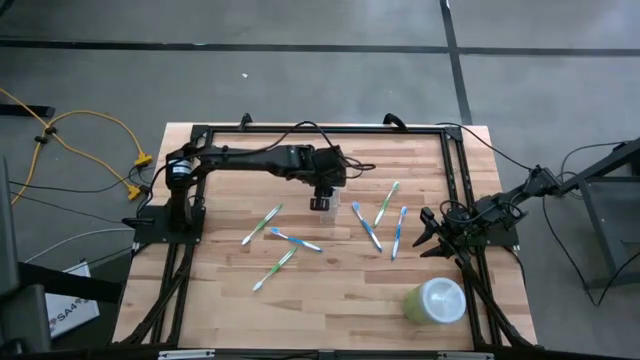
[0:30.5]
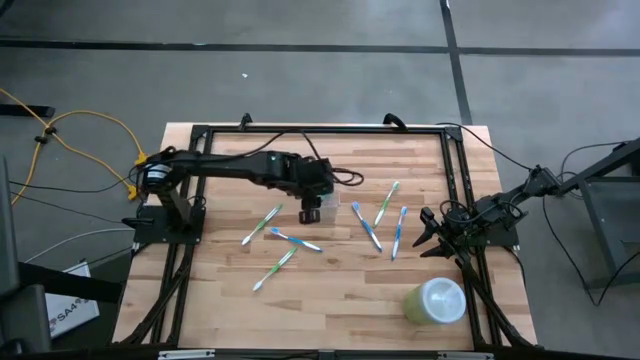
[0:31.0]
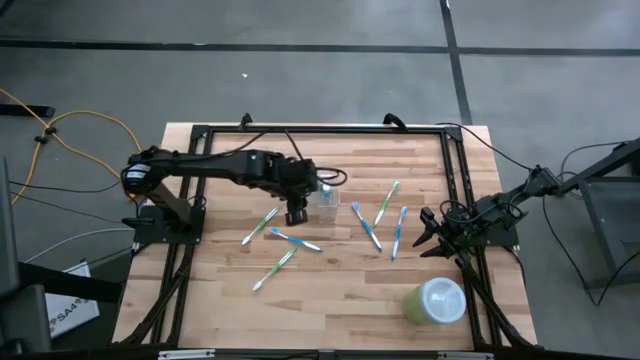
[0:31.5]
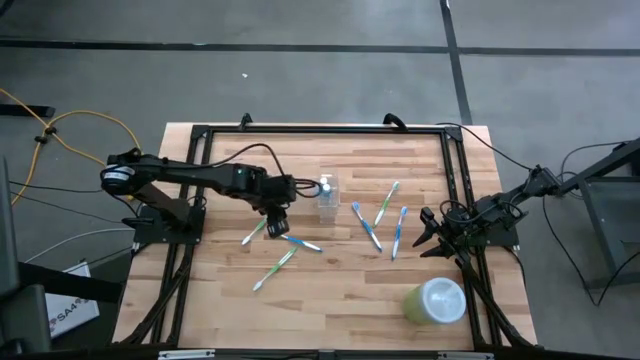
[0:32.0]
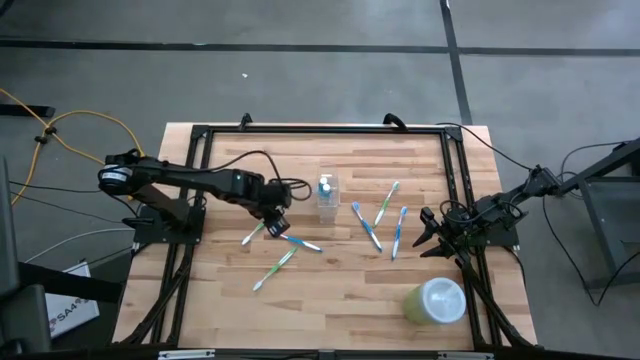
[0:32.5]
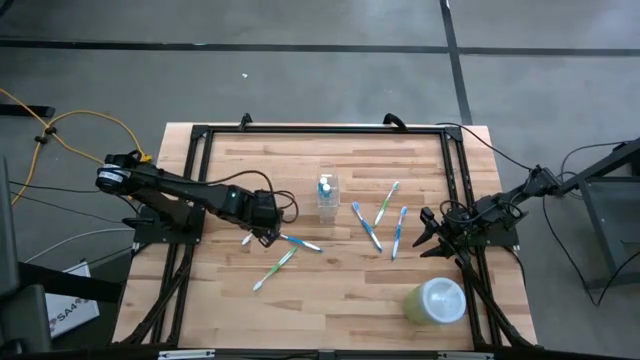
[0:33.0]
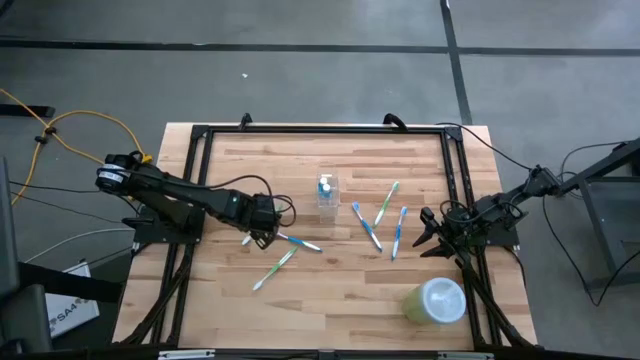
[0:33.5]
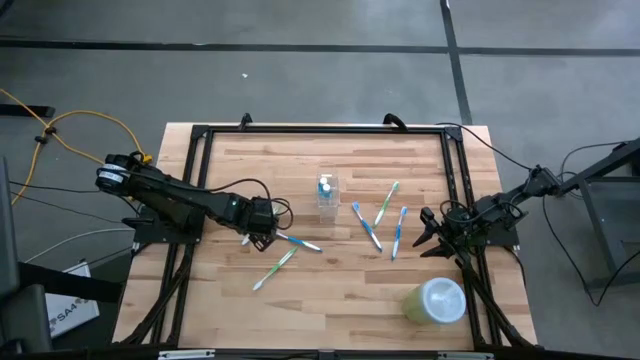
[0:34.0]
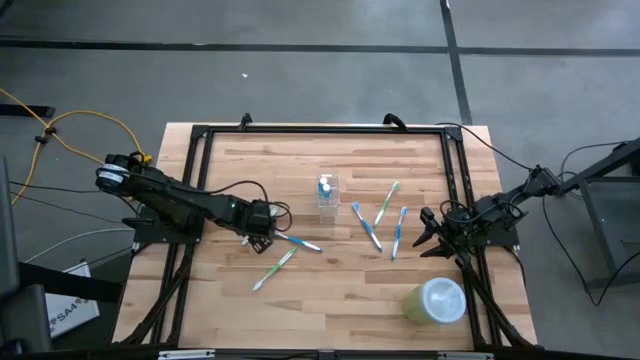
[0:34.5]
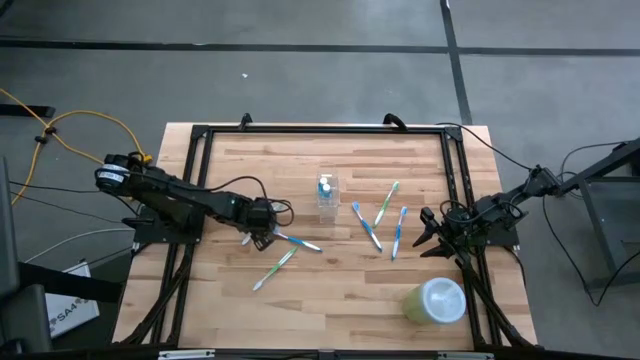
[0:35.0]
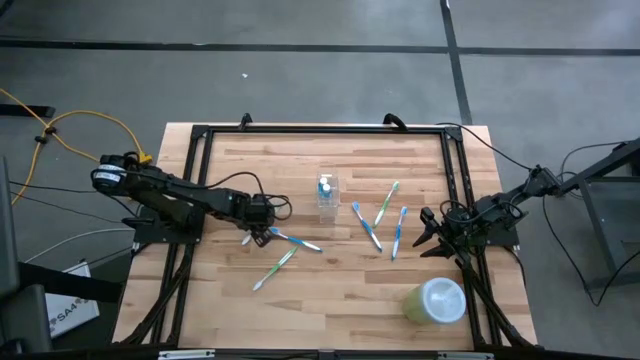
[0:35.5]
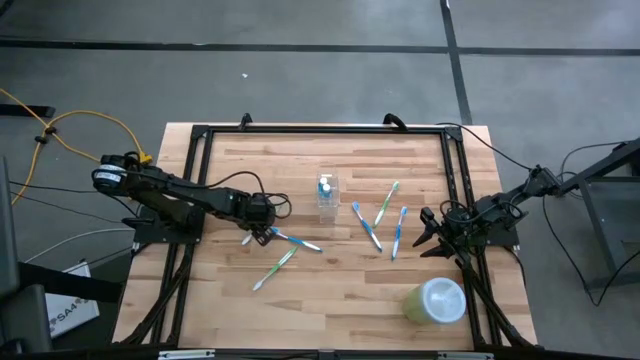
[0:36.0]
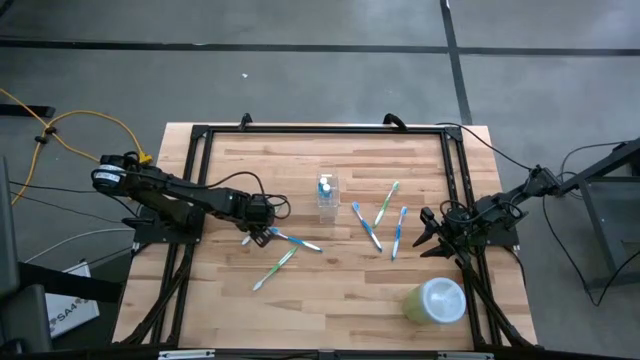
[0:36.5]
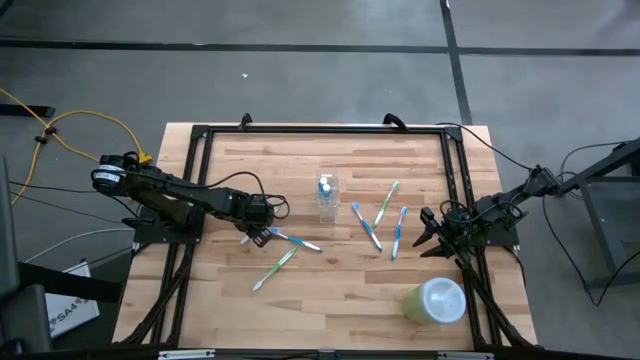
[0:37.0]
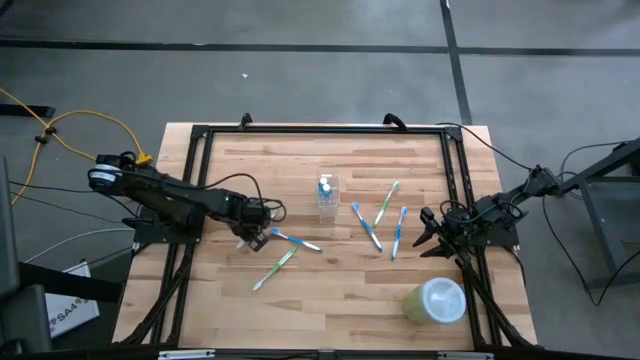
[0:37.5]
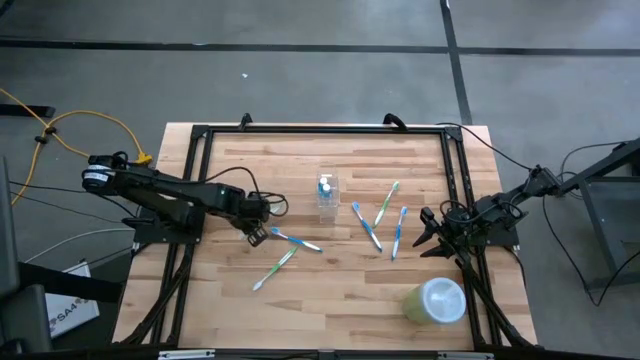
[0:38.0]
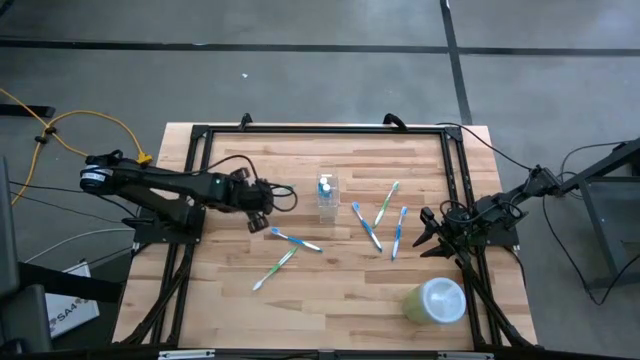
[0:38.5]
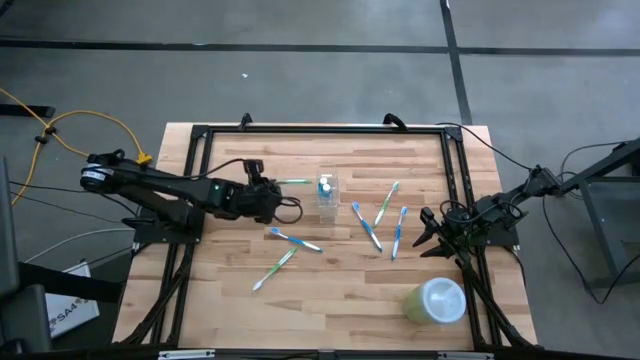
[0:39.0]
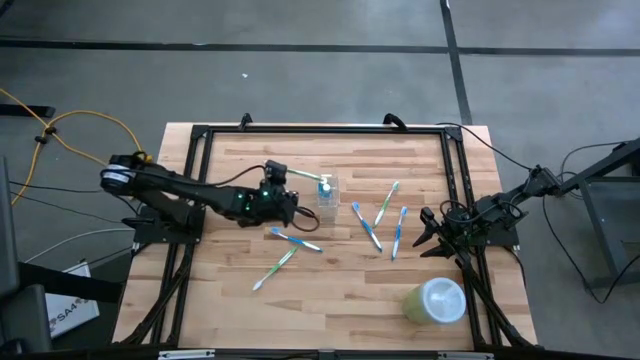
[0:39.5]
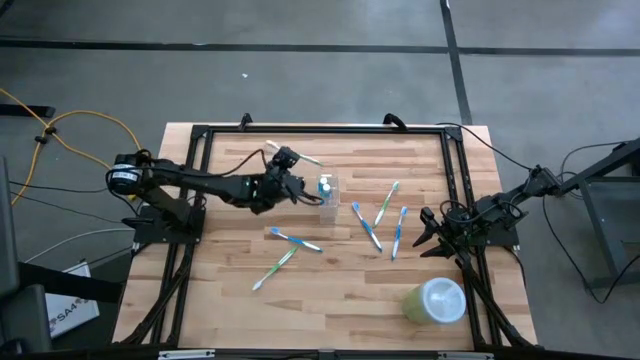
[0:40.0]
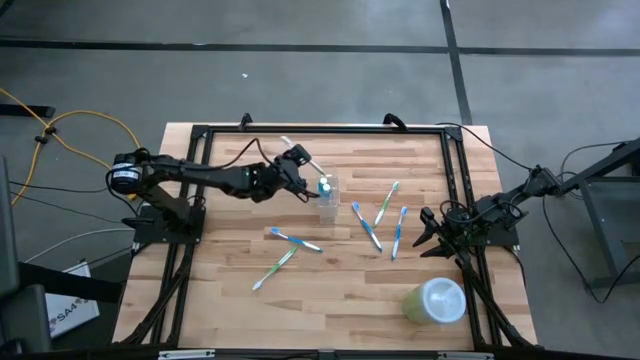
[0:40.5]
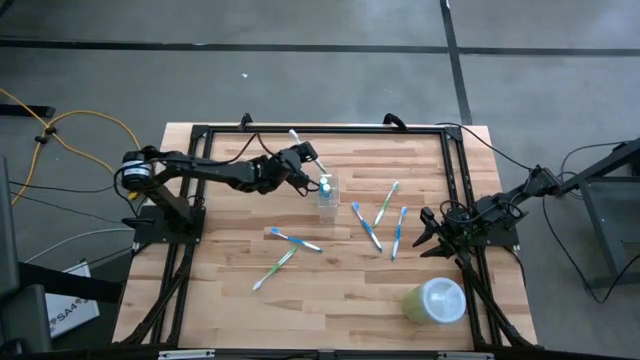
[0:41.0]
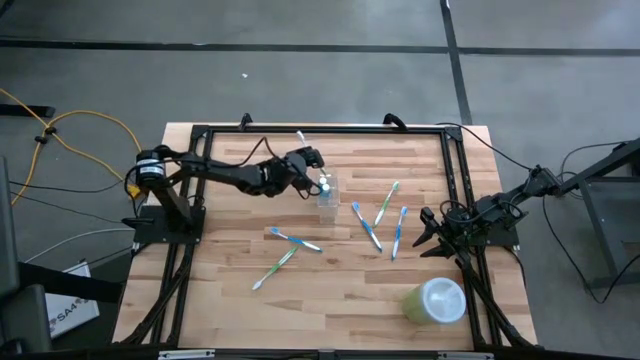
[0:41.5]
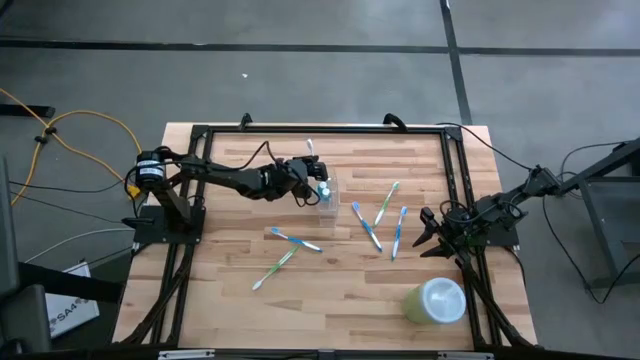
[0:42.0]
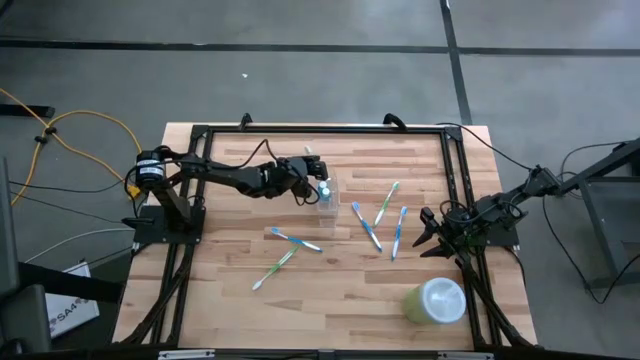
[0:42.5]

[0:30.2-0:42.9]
Task: Pick & Place toothbrushing station
Put the top left green toothbrush into the transparent organizer

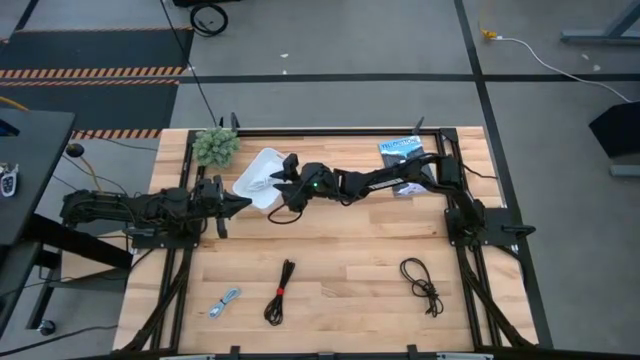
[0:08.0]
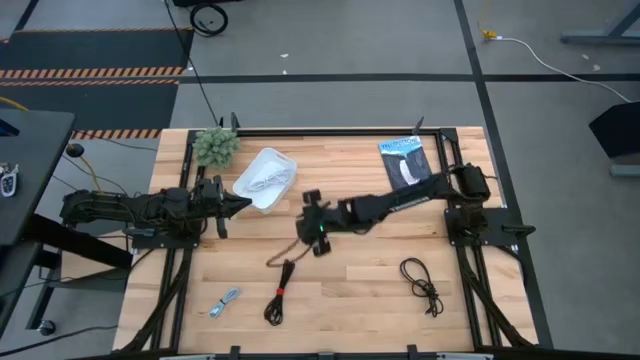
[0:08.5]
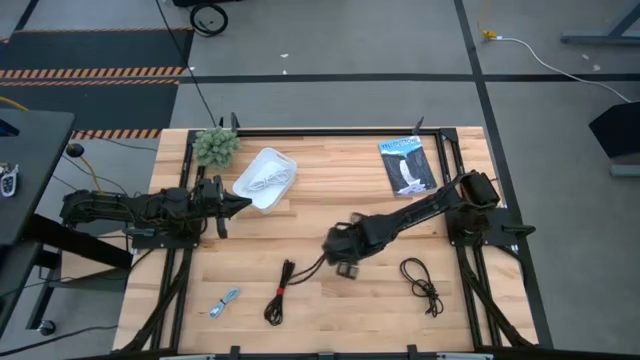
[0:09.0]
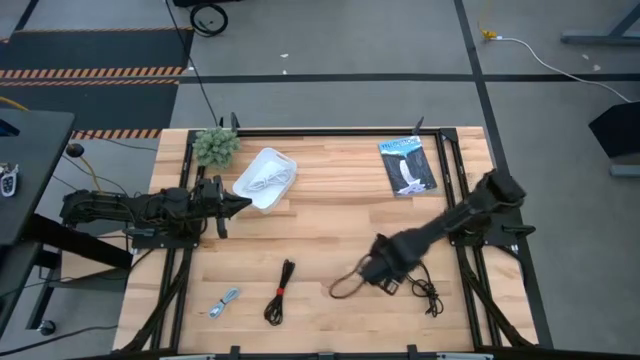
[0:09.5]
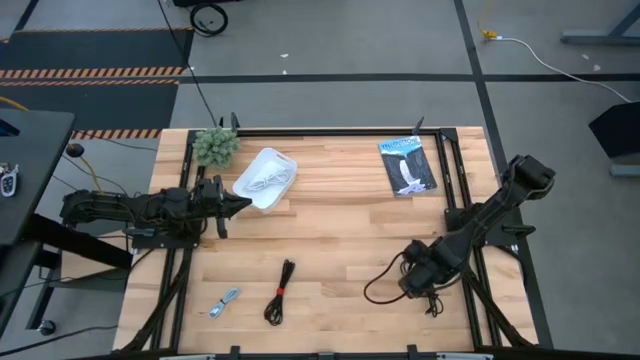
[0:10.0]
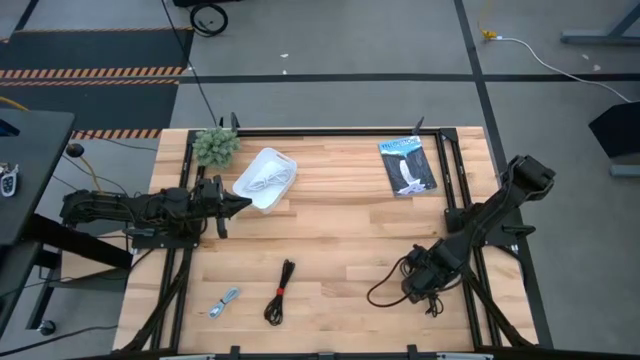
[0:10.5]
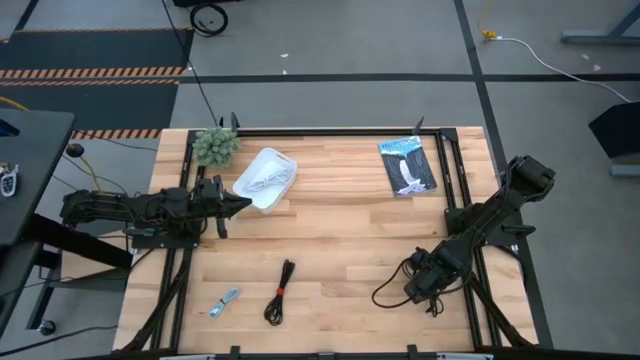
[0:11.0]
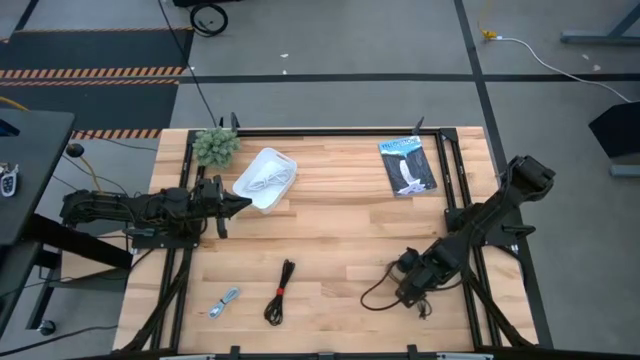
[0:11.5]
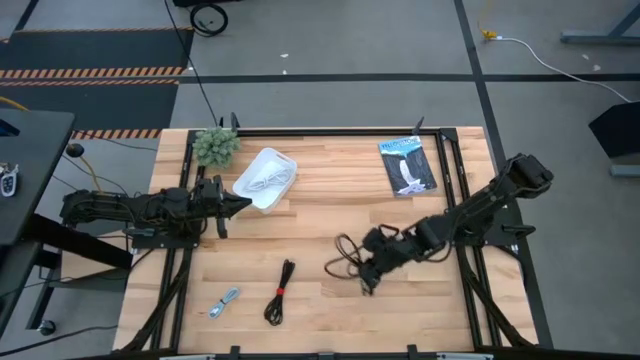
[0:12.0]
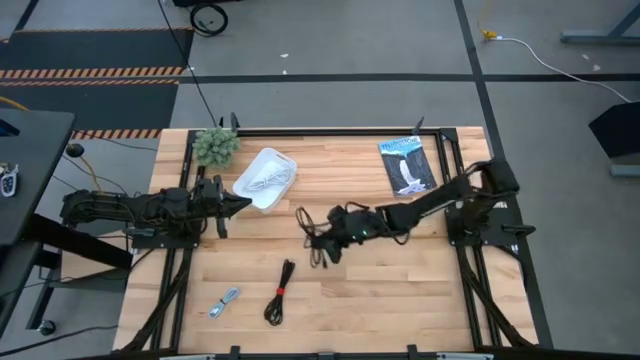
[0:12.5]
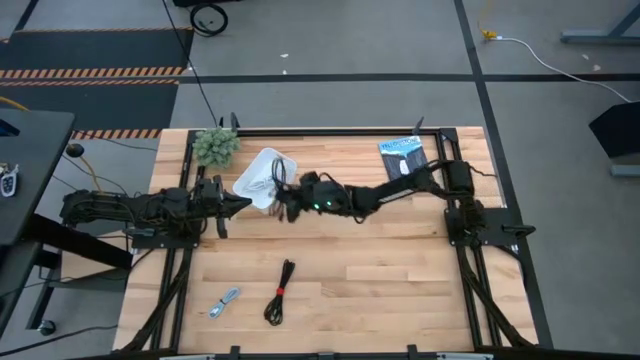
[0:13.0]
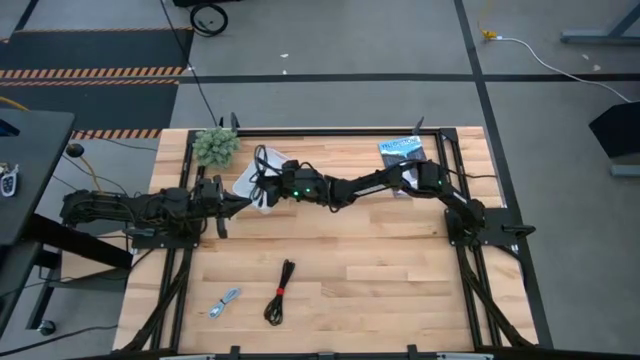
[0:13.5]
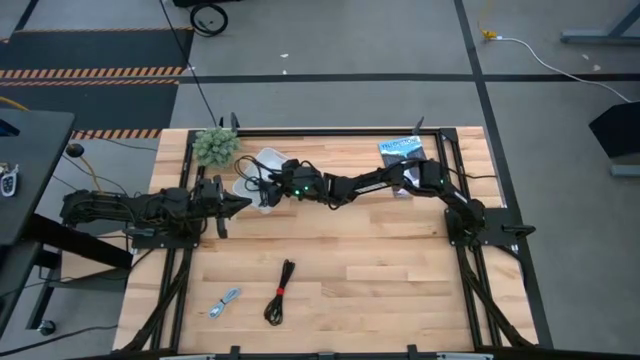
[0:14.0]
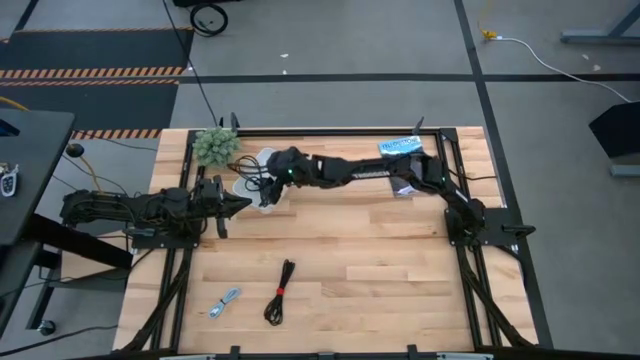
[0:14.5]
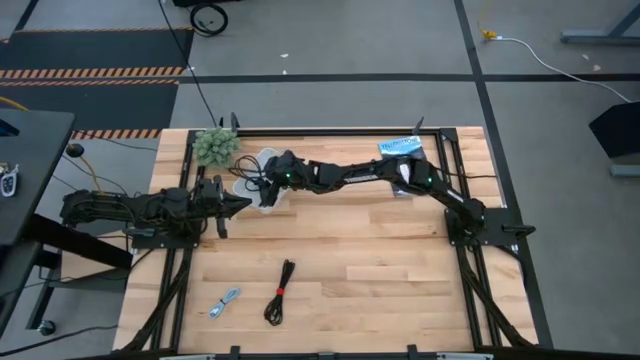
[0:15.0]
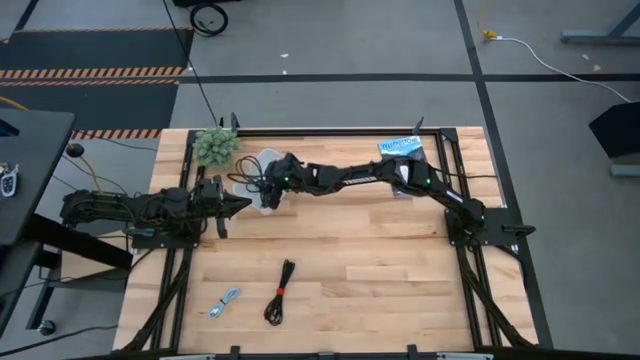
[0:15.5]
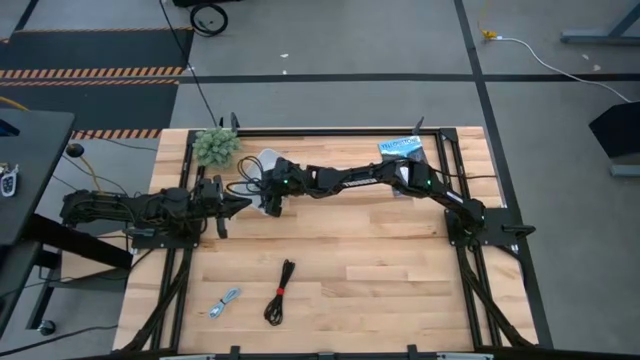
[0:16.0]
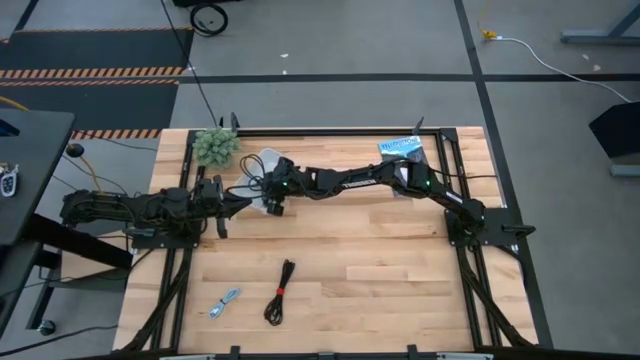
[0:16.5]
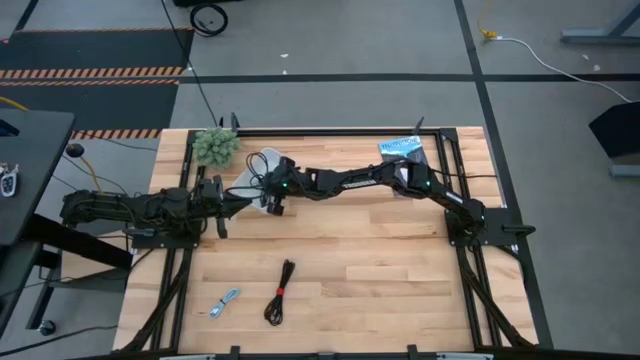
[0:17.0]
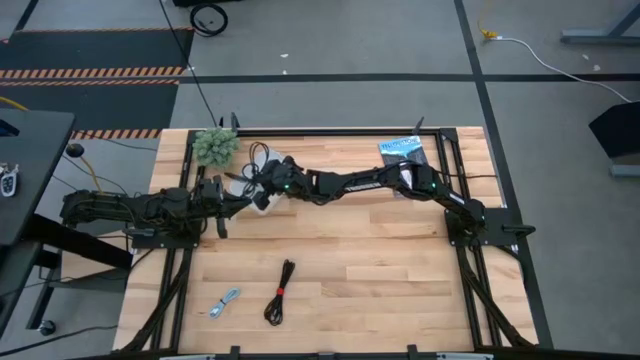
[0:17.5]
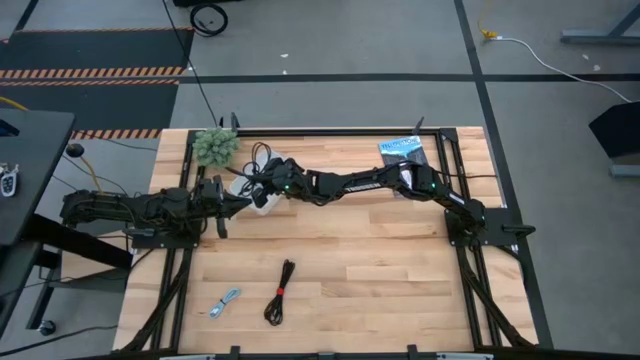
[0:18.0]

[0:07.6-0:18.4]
Task: Pick and place USB-C Cables
Put the right black charger cable into the white bin
